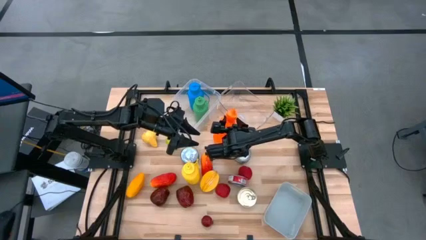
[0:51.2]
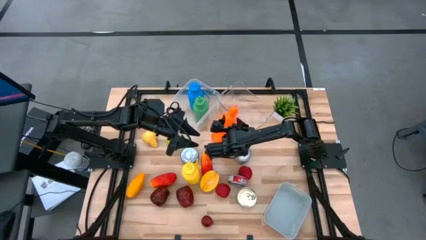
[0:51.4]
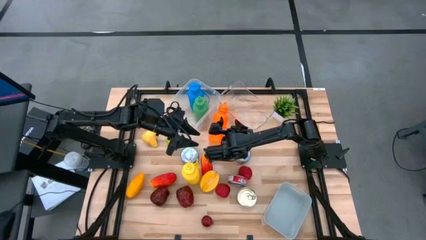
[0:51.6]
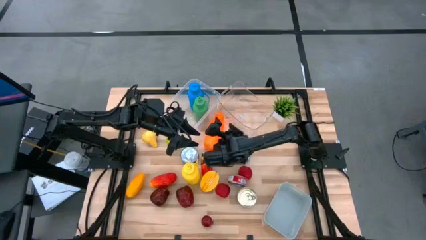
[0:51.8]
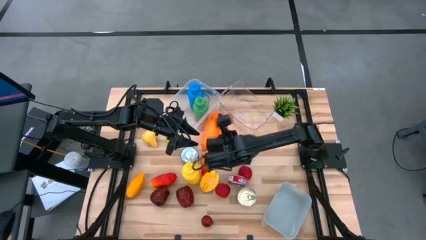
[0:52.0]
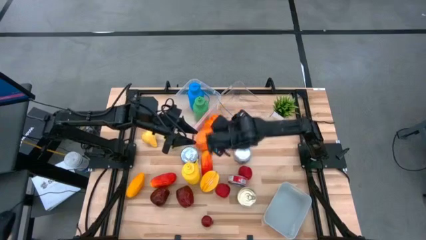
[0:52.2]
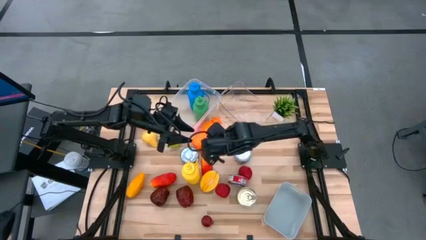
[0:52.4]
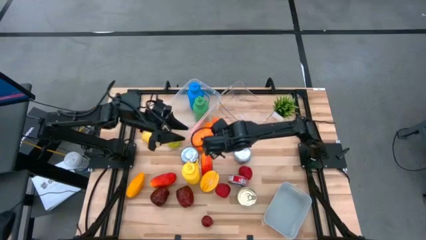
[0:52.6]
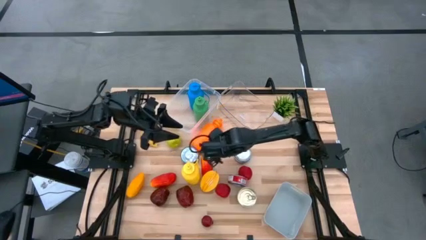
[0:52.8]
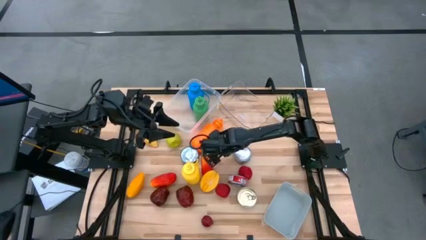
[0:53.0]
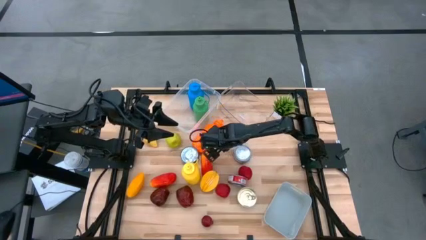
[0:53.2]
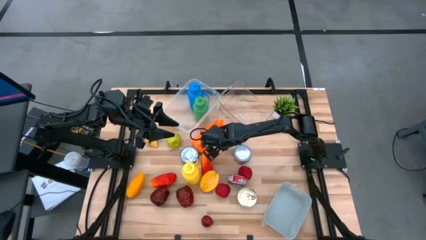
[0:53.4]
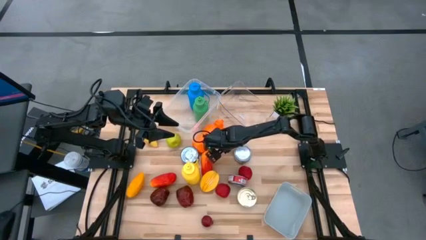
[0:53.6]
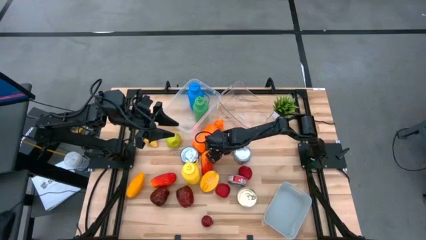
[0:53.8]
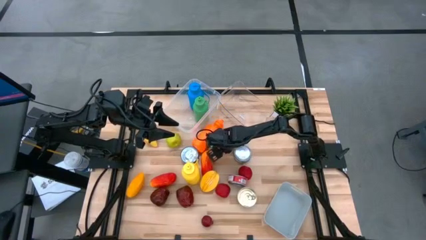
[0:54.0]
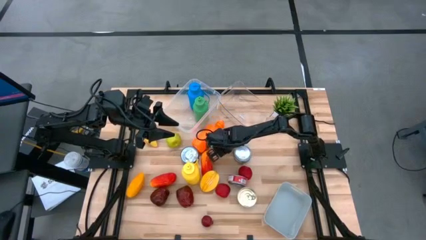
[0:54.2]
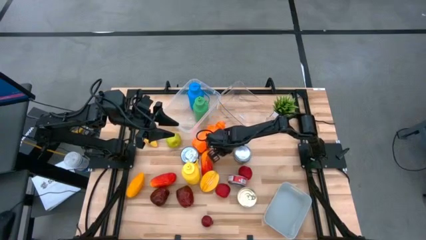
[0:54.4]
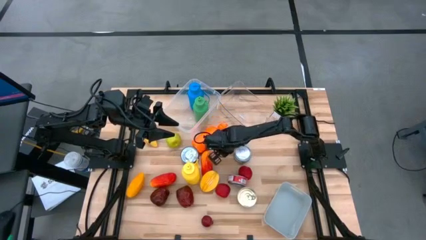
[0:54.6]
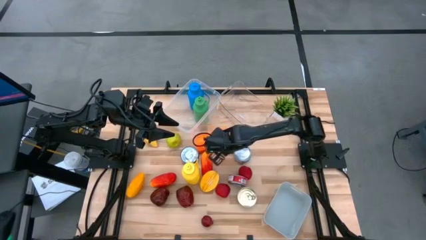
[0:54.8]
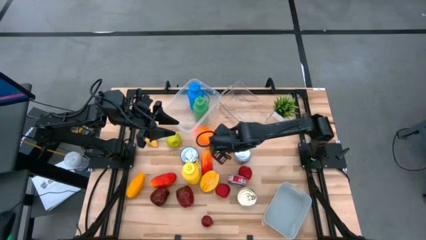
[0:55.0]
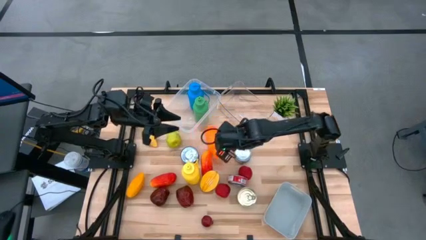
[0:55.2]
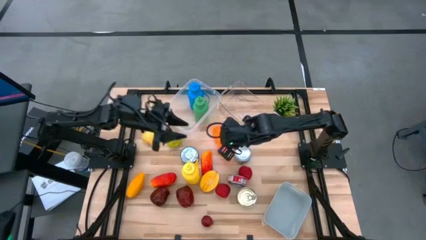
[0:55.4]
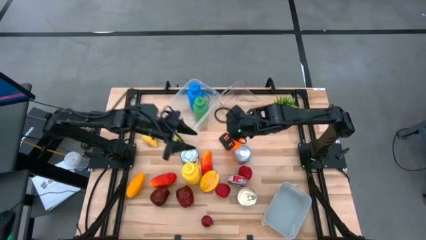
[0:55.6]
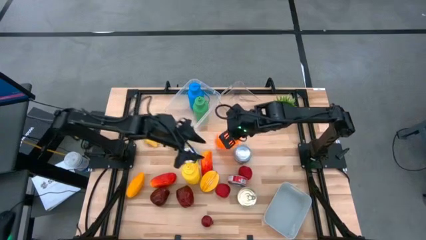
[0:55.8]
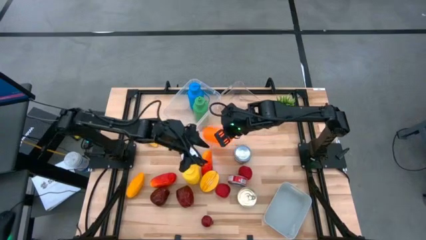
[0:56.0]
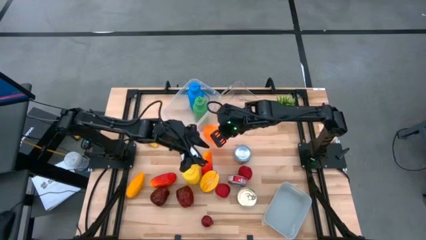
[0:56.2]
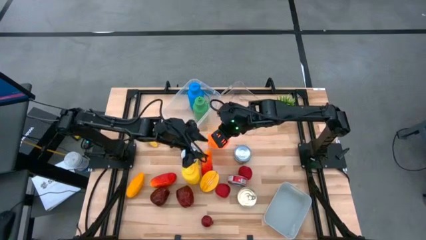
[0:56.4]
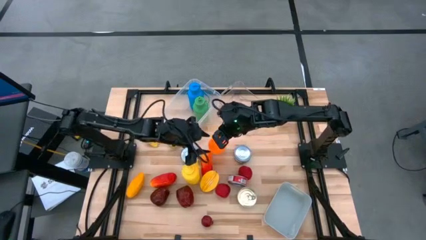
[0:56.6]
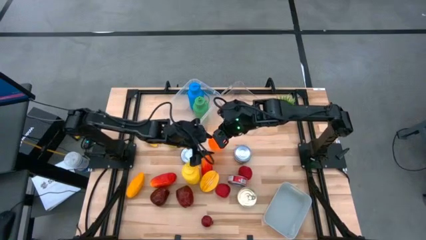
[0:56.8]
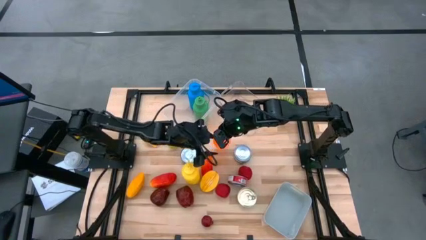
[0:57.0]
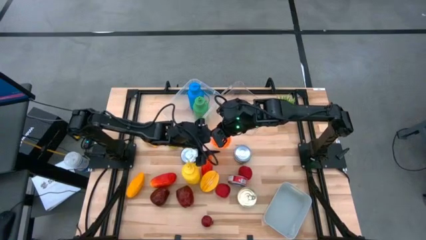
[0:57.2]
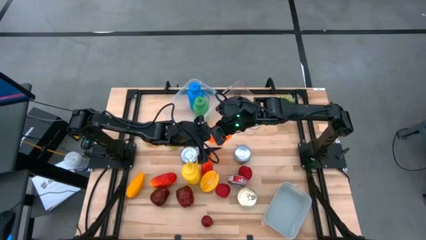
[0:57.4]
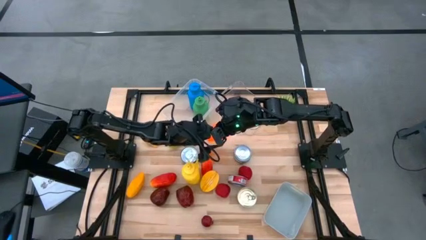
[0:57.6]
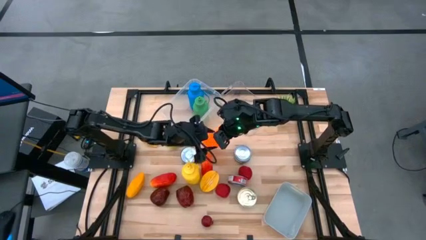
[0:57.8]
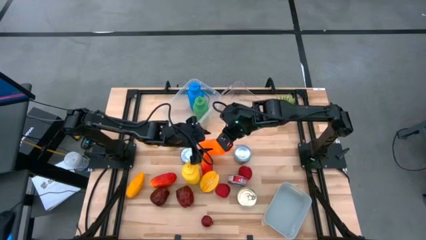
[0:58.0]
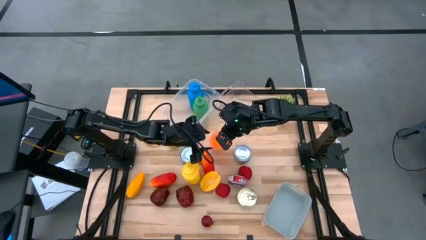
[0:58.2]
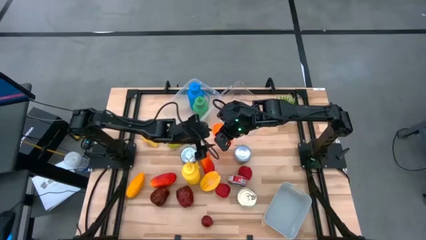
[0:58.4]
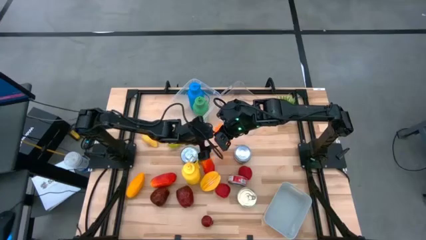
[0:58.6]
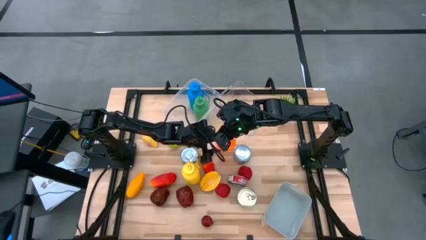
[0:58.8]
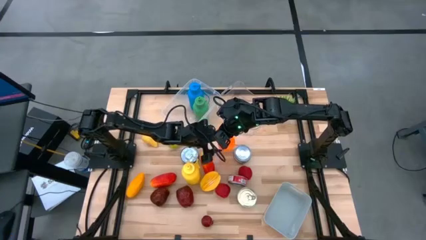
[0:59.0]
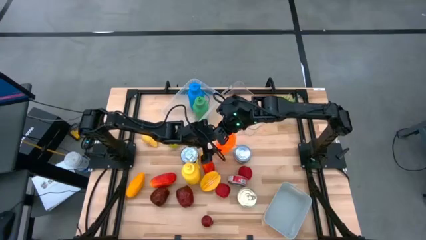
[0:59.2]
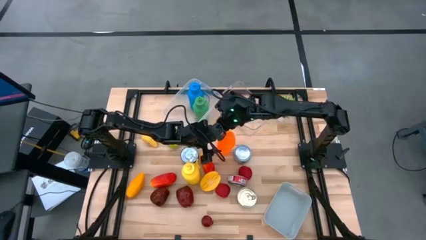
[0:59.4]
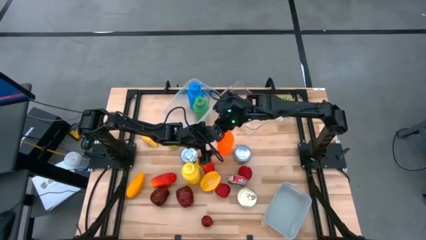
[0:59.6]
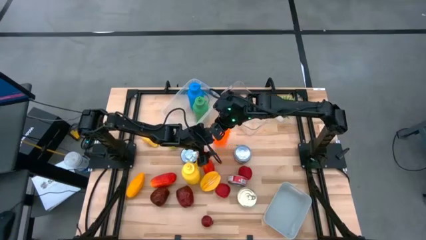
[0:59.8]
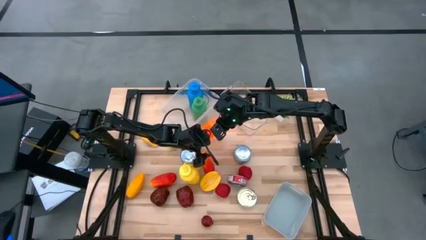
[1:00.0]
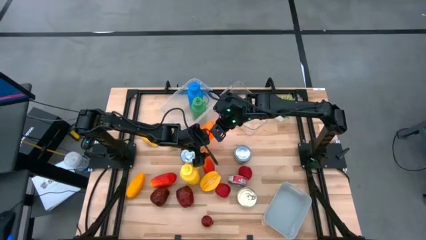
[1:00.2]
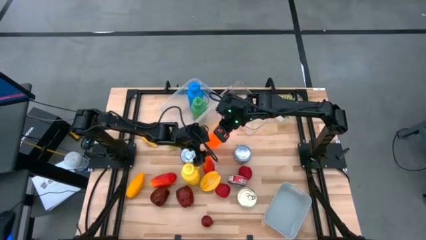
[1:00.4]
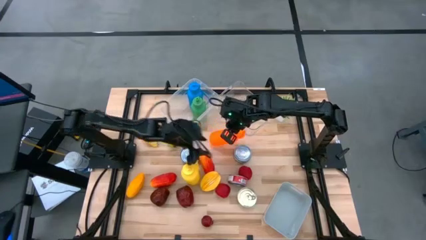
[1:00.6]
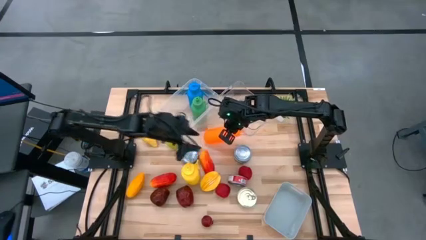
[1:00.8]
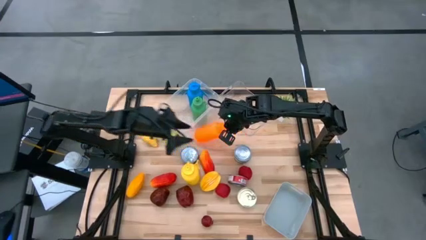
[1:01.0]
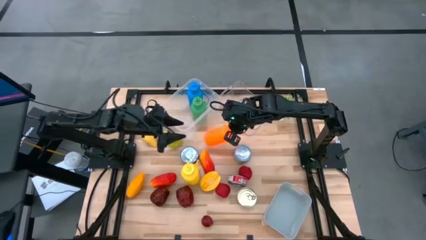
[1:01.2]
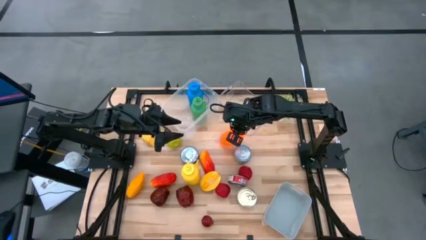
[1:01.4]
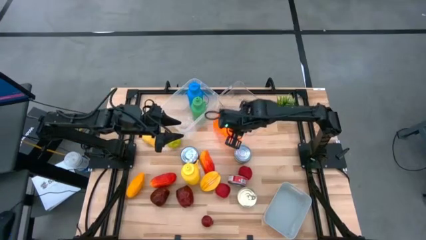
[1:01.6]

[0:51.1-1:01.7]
Task: Pick & Place Food Item
Put the orange water bottle into the left transparent bin

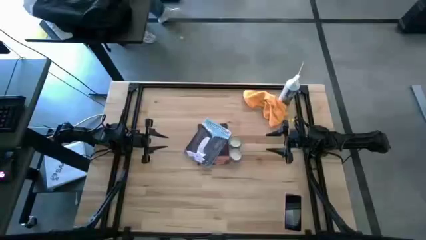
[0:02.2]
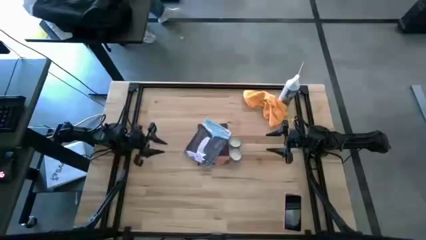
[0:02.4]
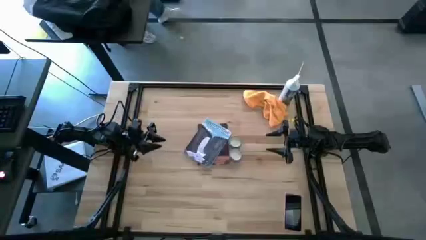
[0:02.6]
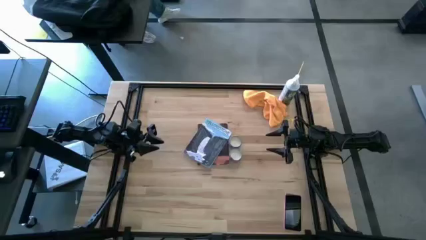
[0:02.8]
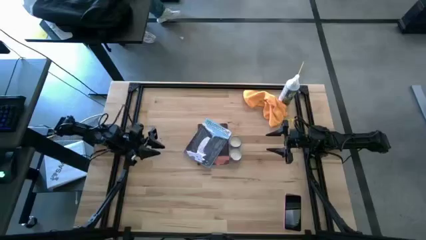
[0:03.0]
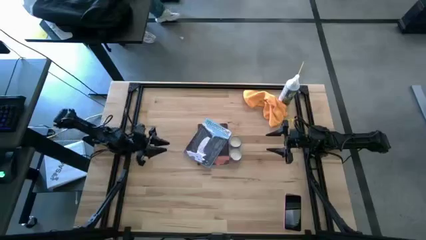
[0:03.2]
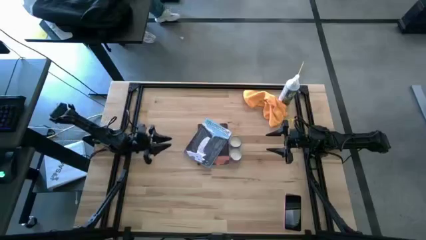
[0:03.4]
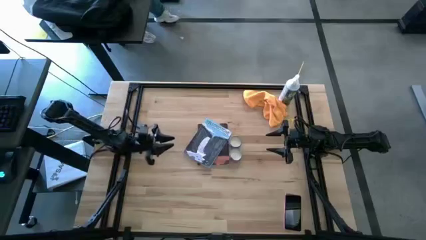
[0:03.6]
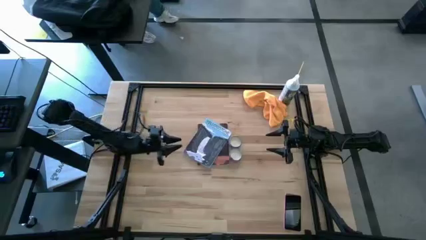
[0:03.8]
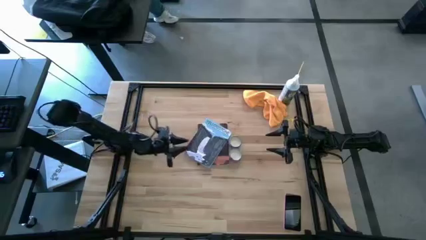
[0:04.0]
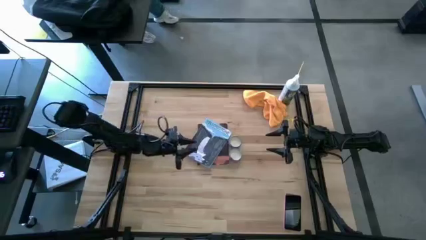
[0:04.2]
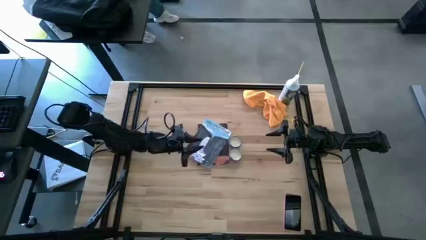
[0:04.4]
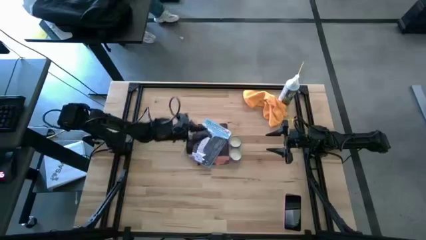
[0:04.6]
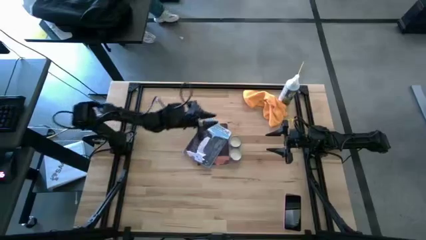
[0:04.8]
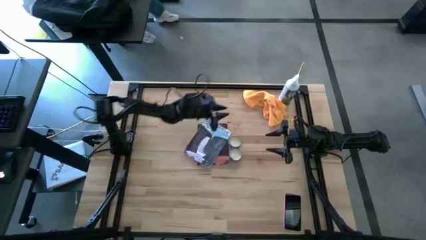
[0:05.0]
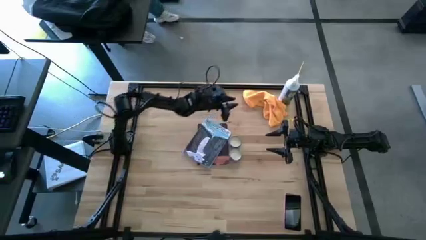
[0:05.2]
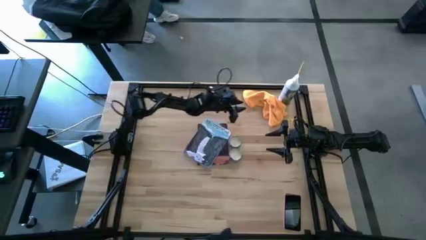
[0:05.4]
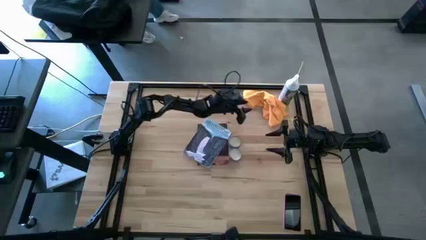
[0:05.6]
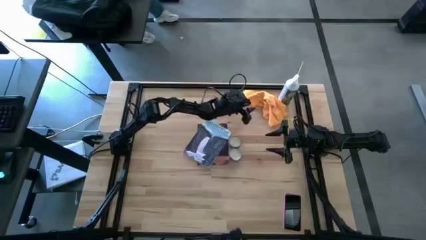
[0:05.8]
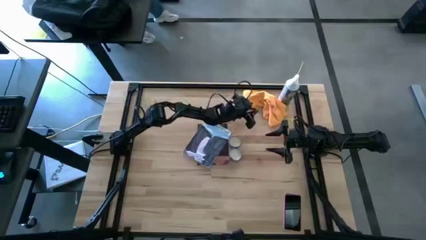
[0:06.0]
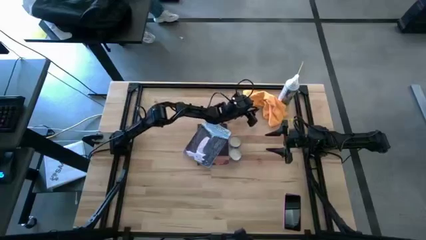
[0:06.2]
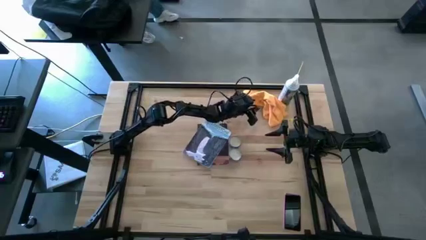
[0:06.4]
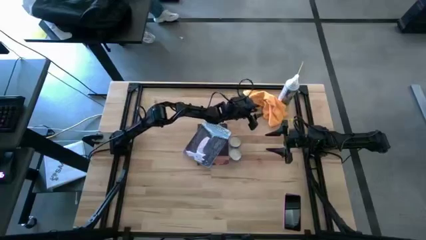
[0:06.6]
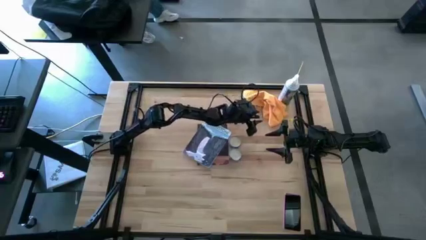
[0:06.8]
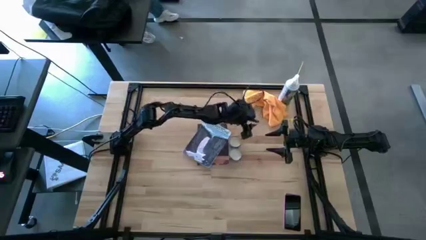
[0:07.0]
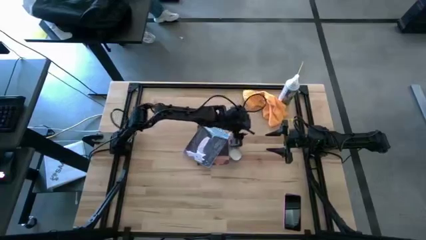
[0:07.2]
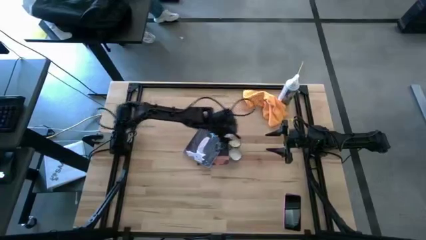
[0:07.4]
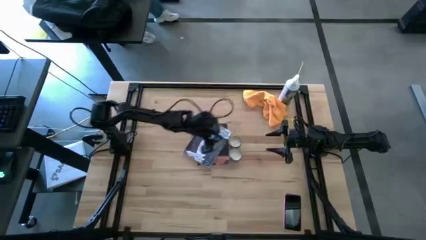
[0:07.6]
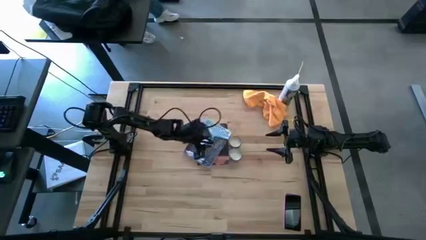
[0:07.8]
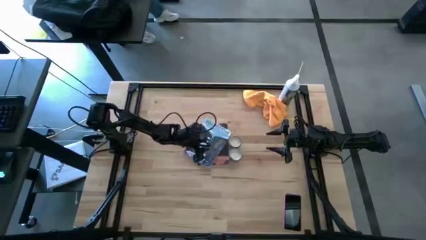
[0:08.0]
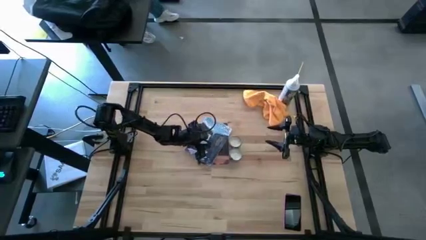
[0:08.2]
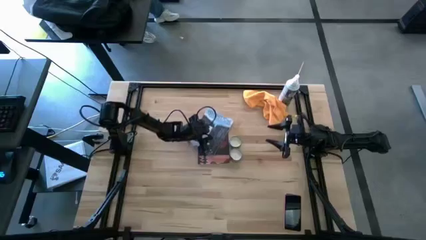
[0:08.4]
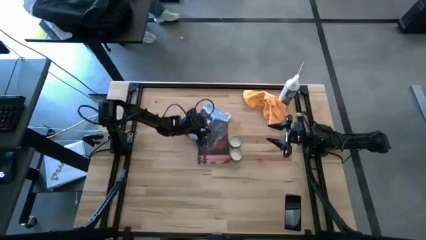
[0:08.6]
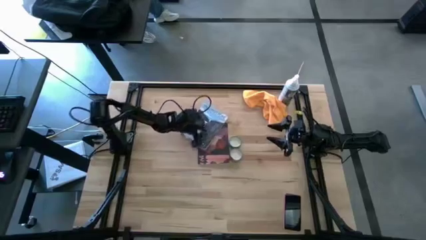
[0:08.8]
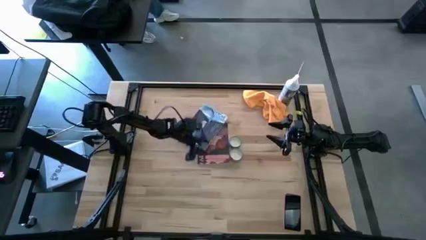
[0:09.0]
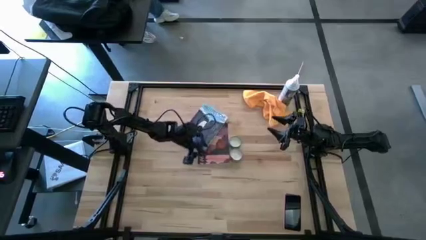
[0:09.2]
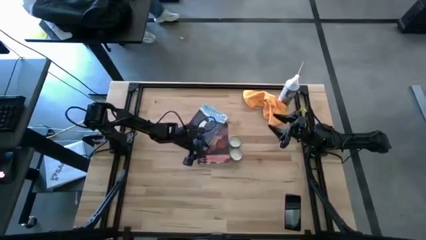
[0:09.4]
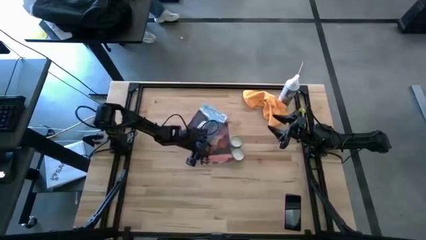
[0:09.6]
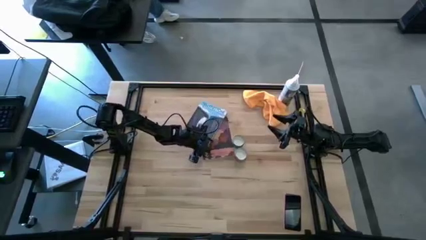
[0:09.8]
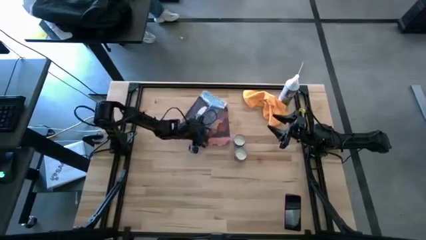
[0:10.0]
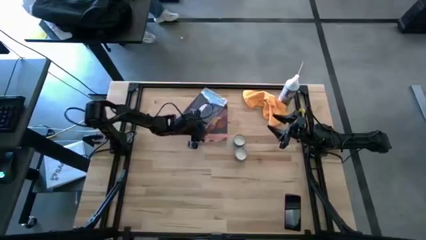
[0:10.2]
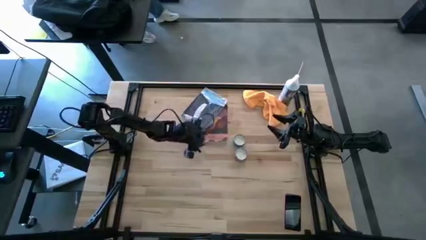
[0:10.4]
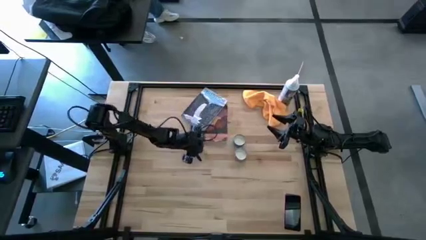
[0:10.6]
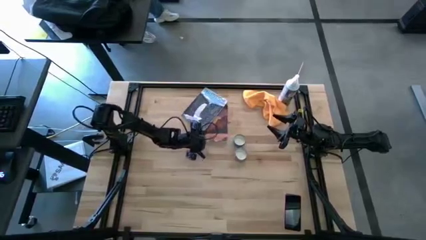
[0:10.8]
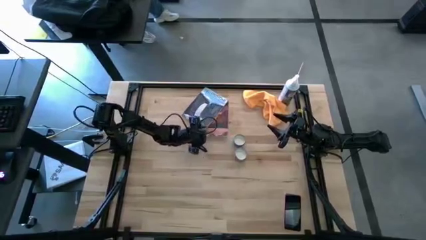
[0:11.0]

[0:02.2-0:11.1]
Task: Apply microfiber cloth
Move the books to the top center of the table
